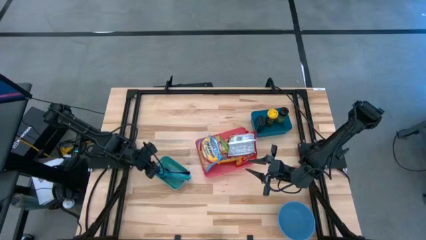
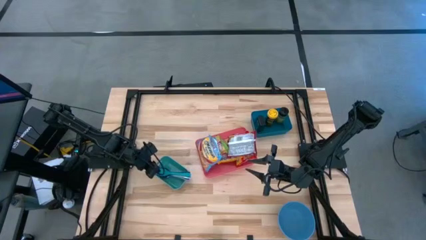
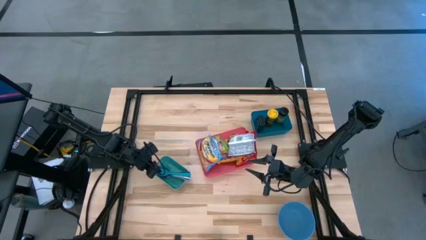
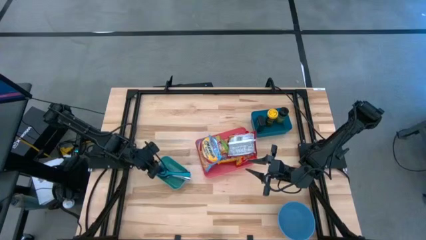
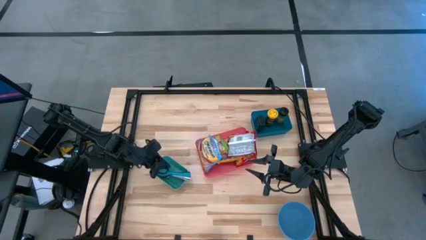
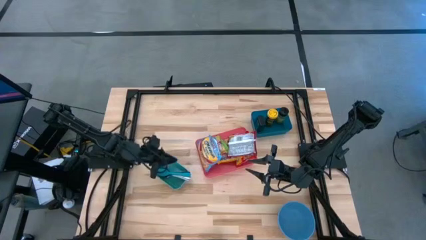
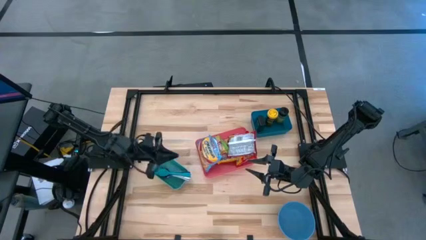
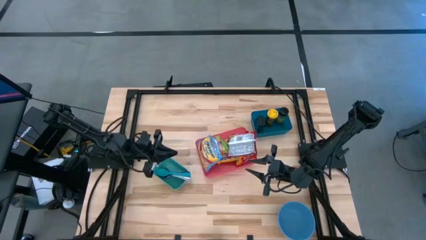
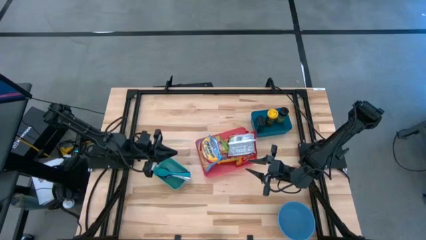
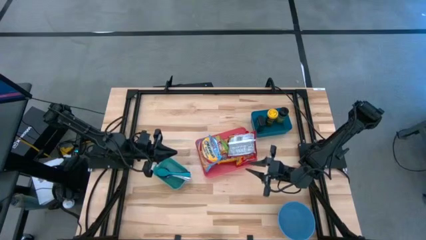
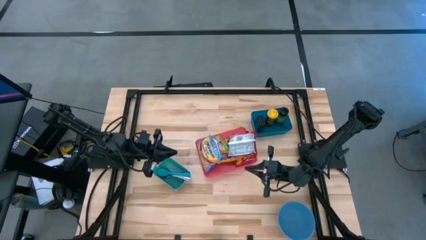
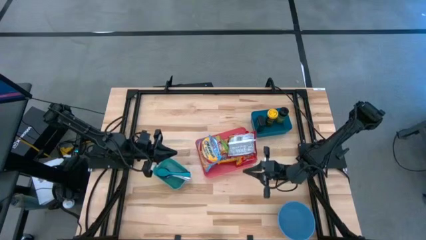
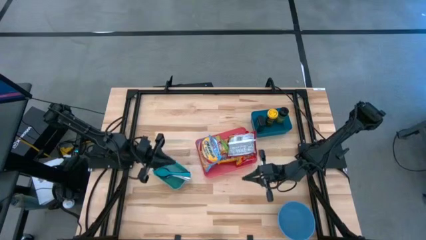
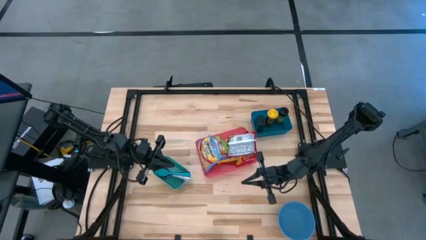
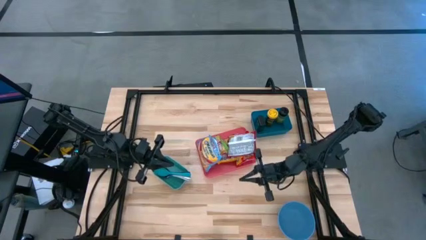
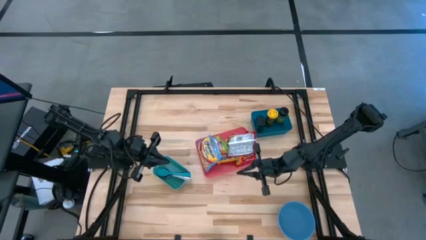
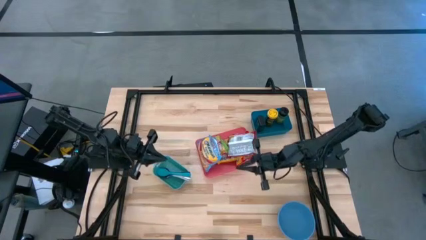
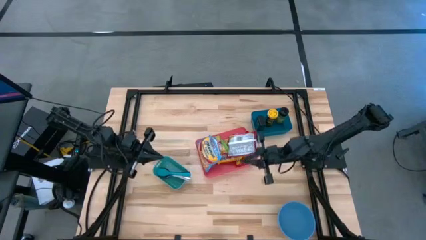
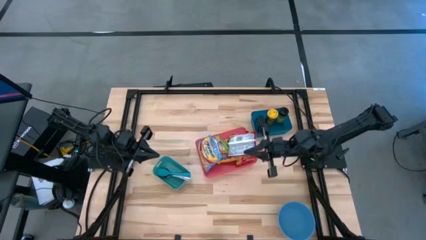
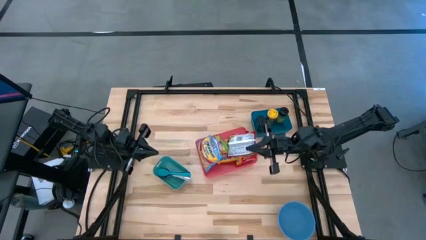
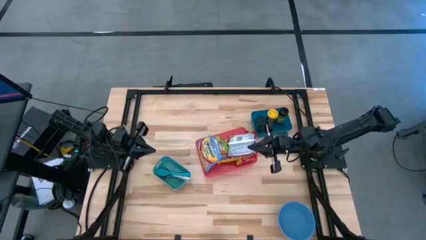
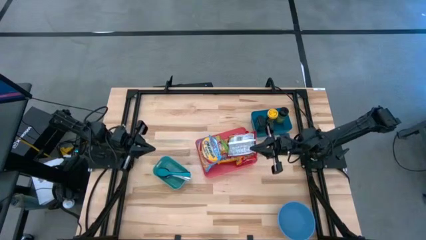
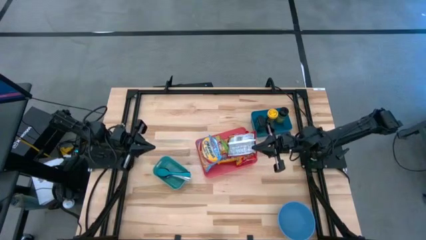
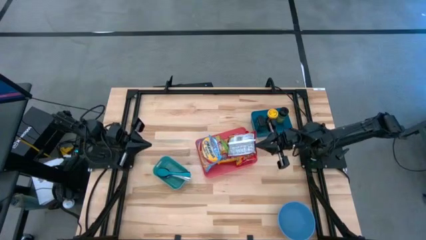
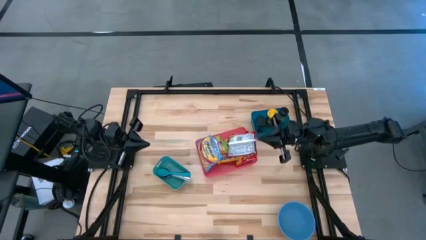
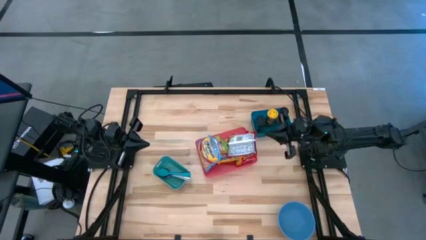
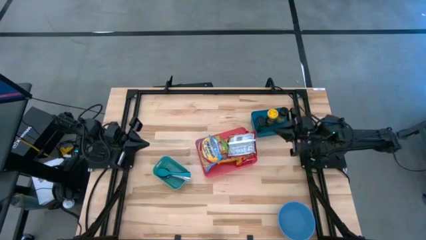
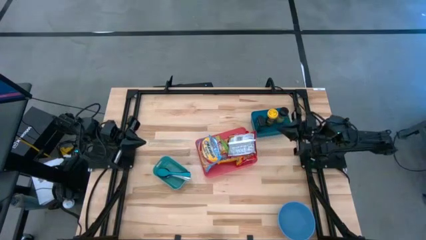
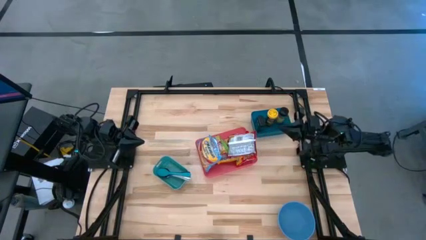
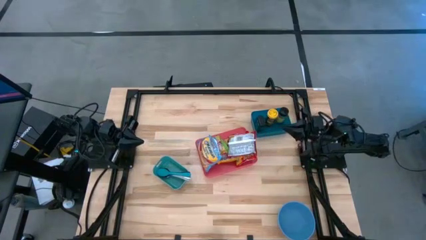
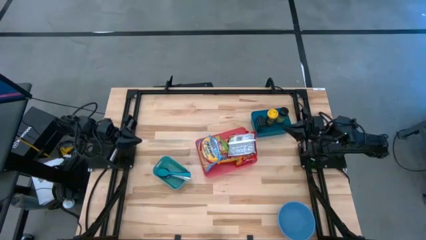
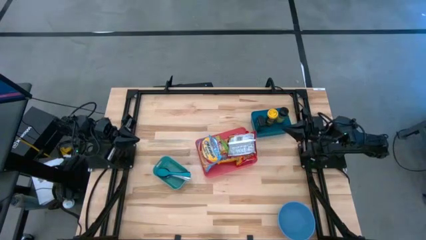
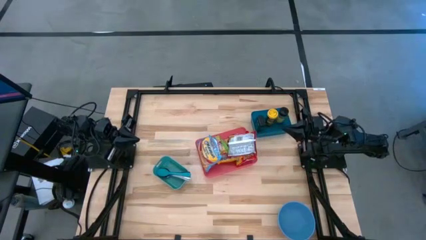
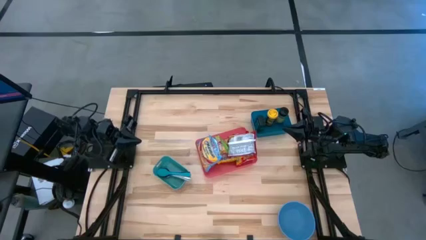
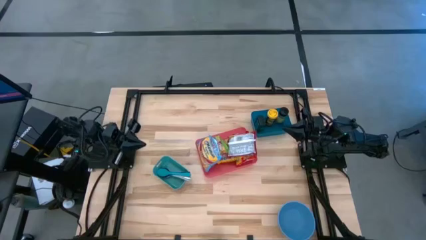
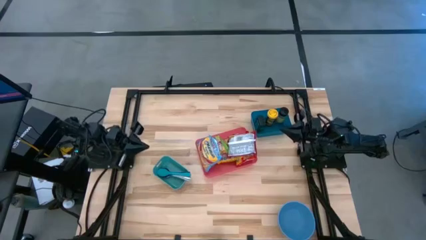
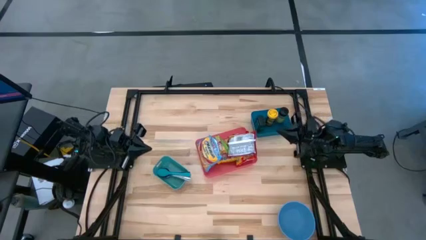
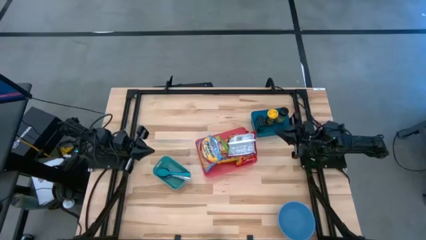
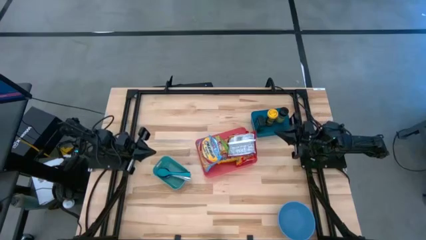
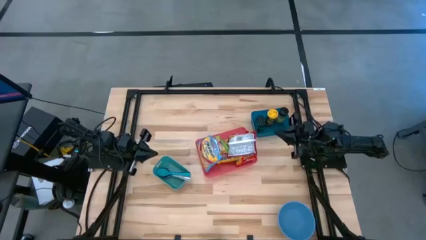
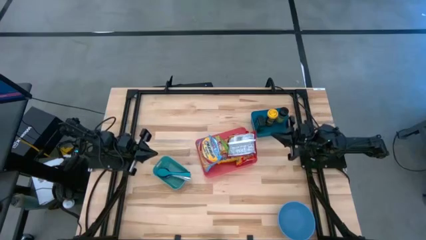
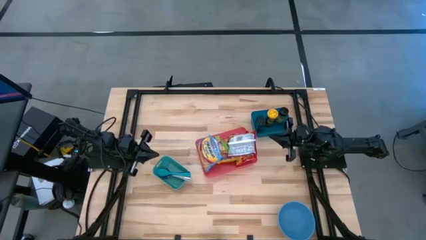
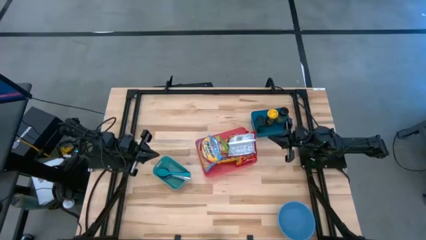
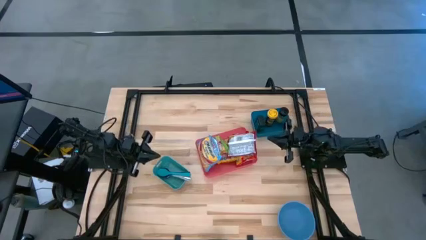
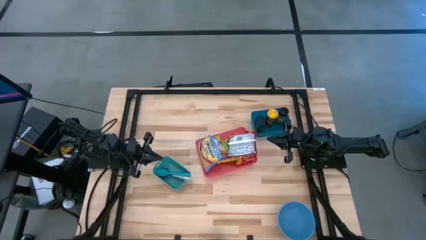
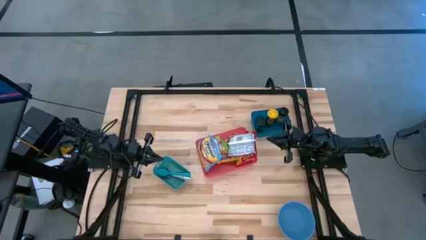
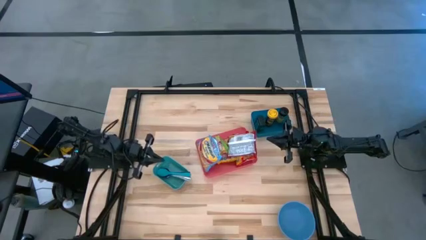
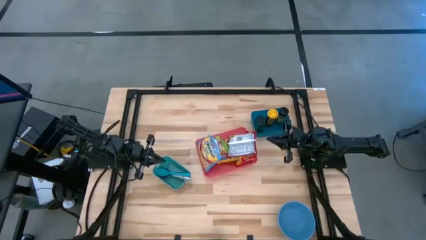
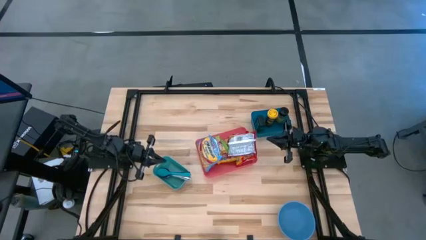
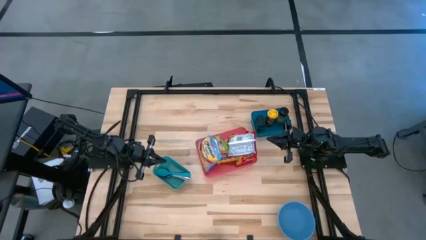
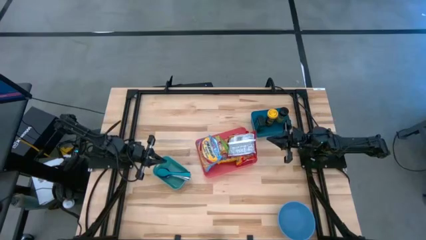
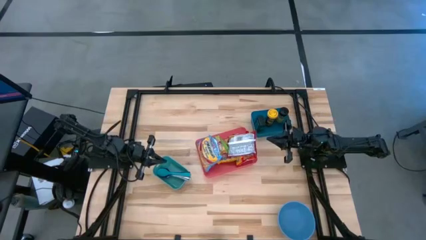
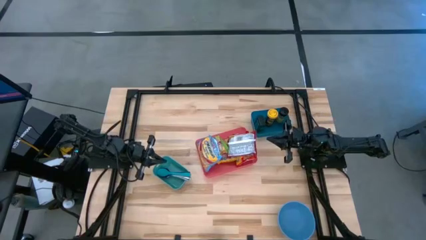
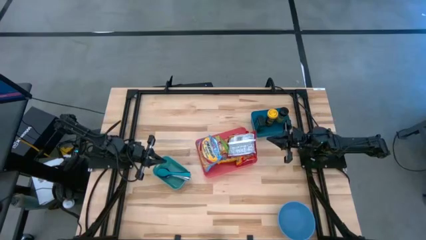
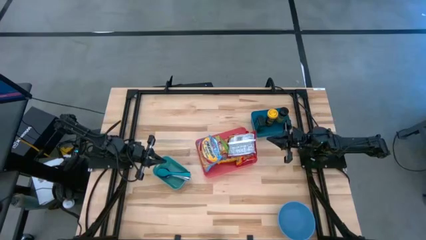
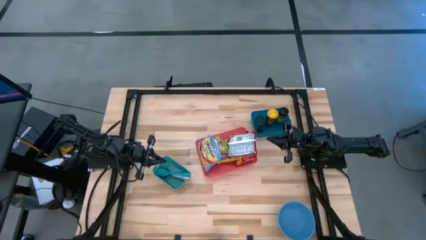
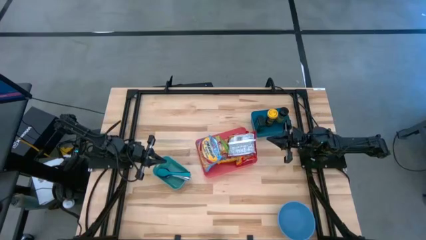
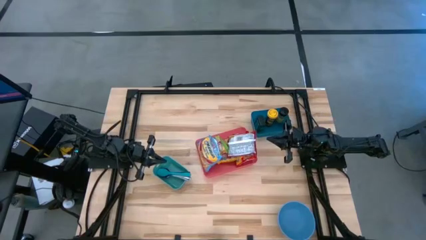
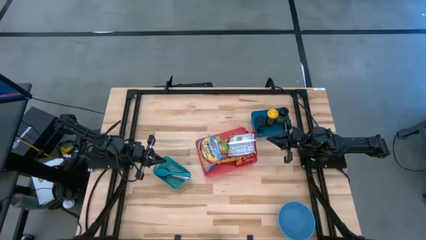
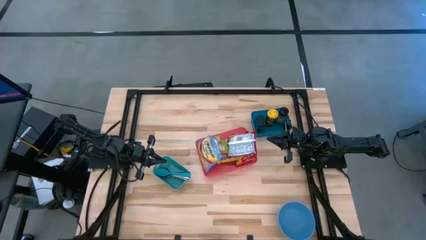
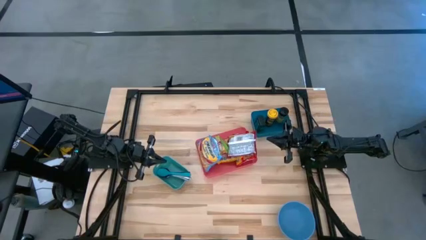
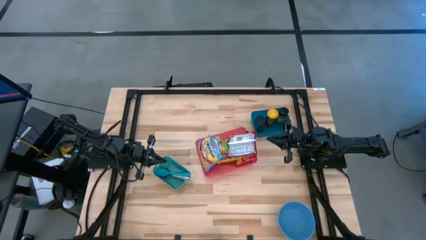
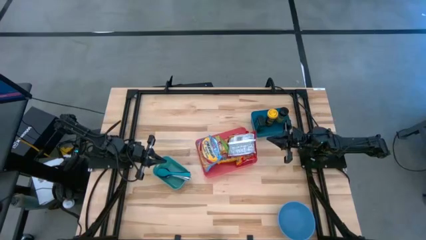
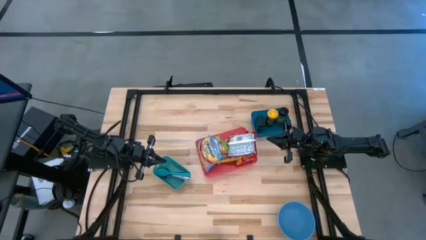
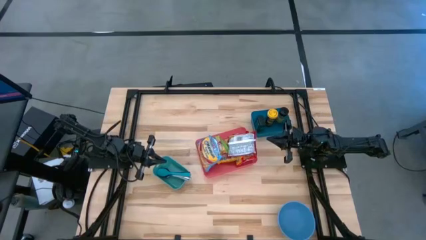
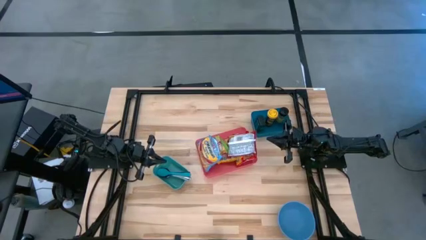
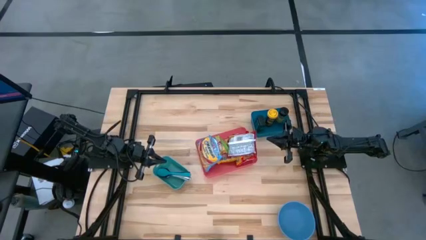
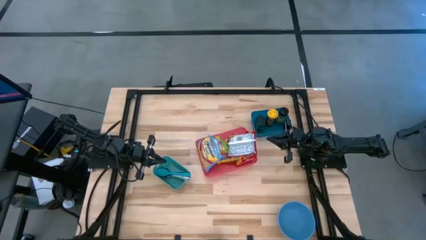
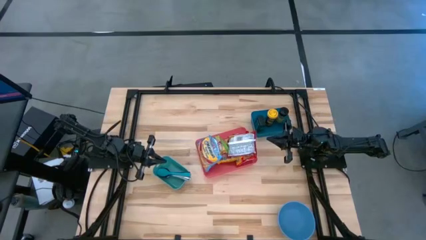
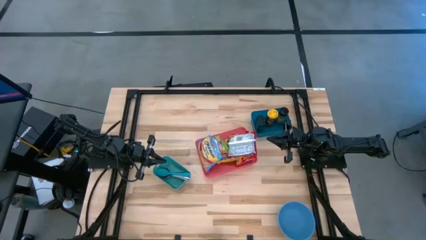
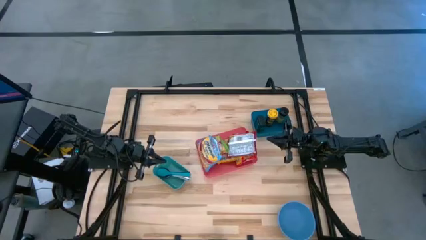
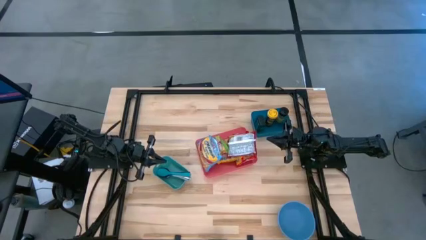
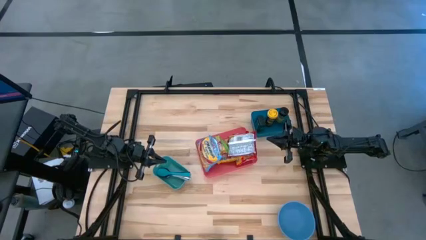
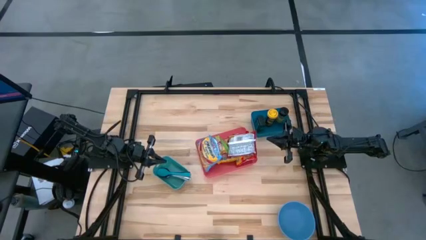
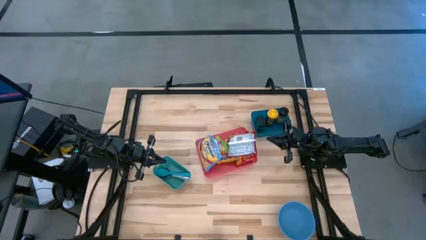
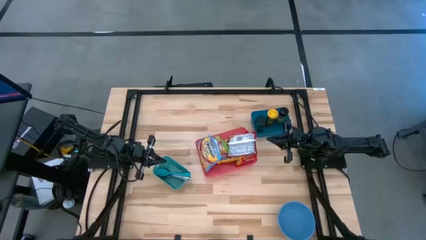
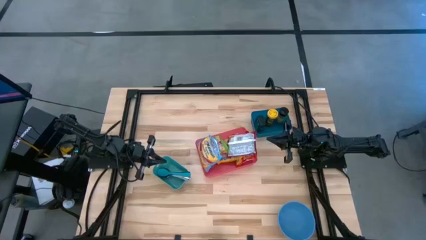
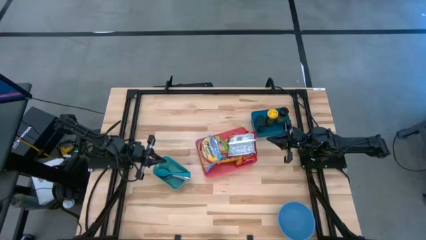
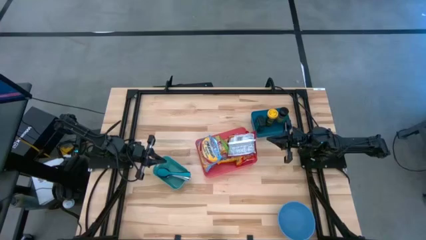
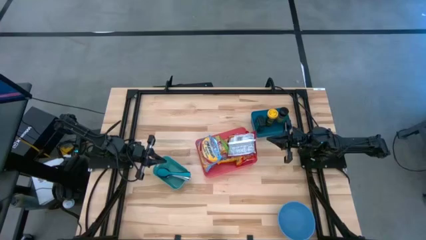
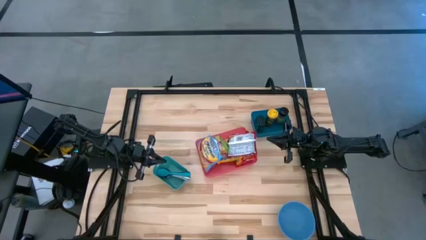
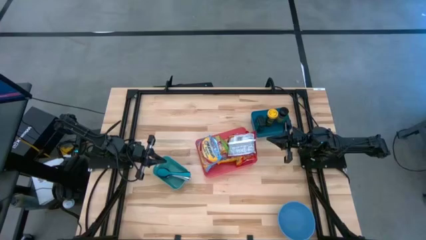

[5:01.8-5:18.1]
Task: Pick & Place Food Item
Return to Home Position
